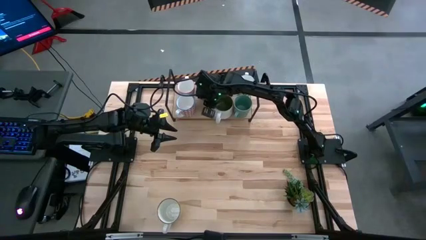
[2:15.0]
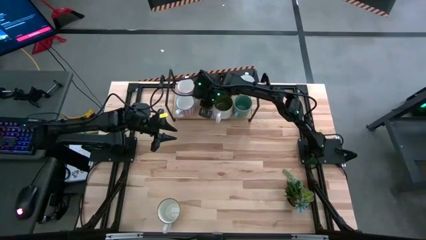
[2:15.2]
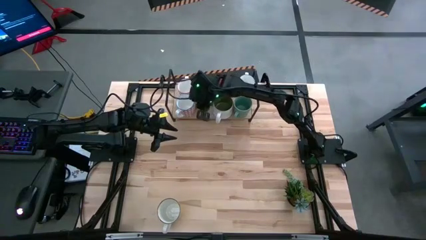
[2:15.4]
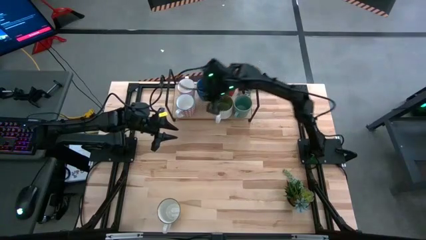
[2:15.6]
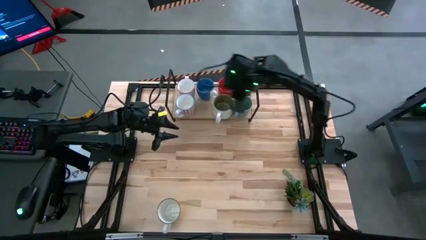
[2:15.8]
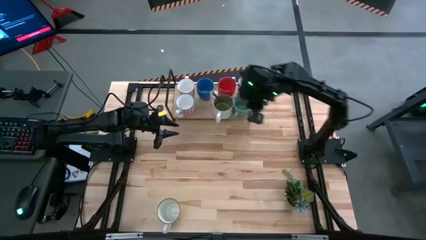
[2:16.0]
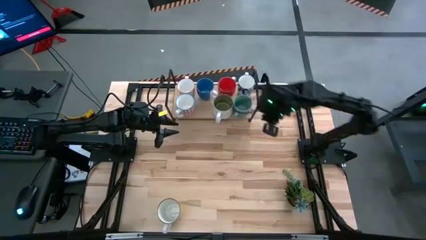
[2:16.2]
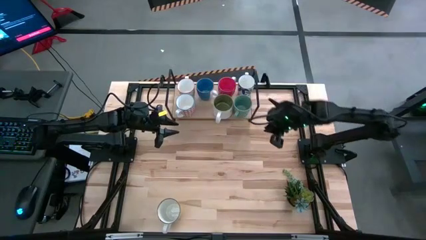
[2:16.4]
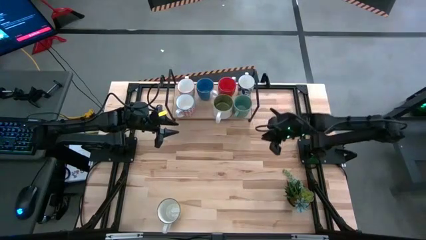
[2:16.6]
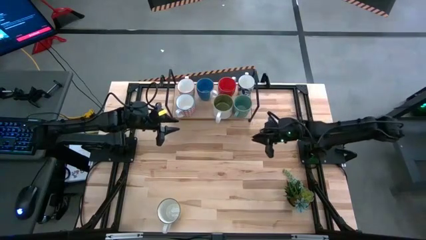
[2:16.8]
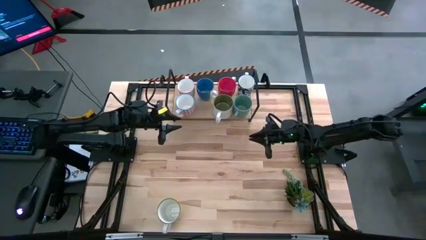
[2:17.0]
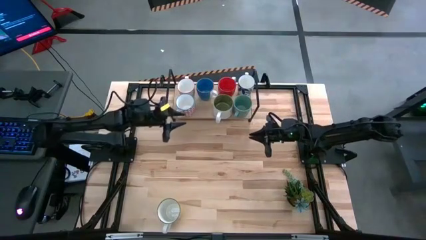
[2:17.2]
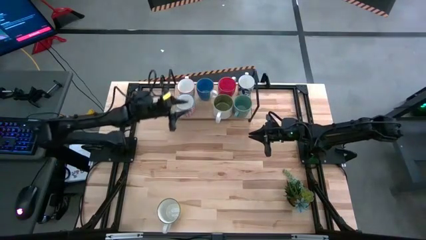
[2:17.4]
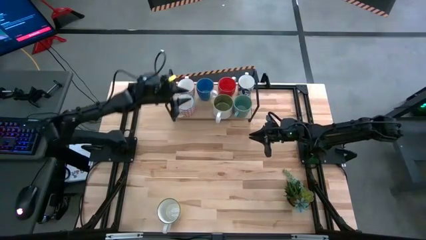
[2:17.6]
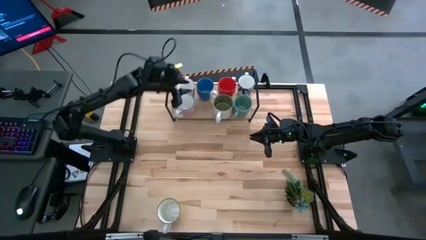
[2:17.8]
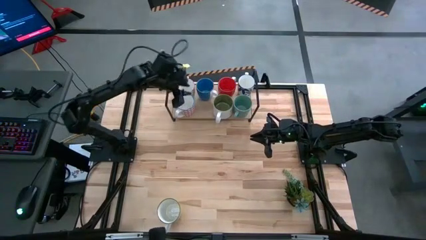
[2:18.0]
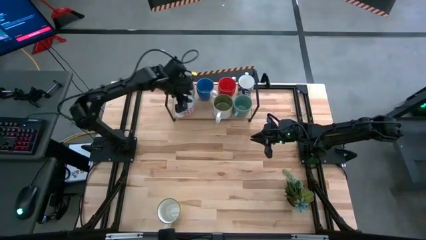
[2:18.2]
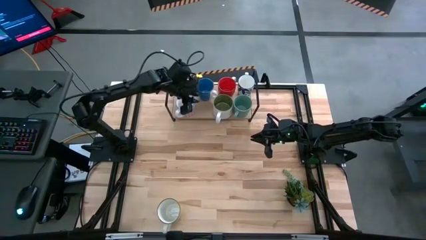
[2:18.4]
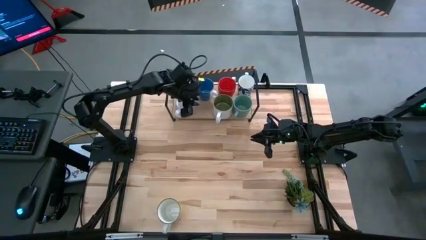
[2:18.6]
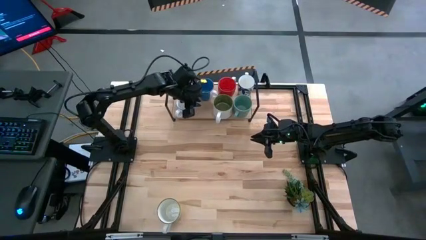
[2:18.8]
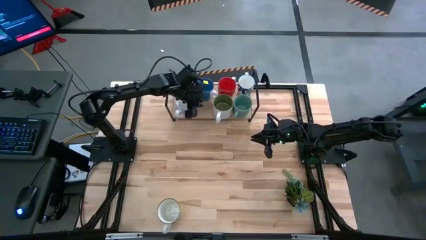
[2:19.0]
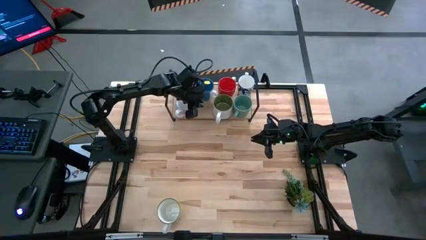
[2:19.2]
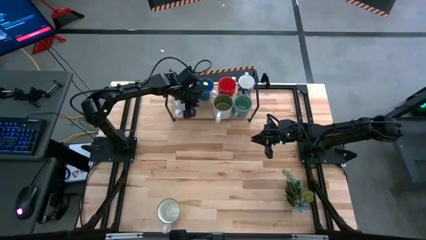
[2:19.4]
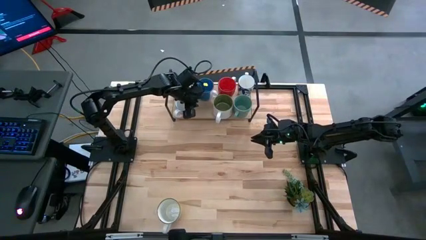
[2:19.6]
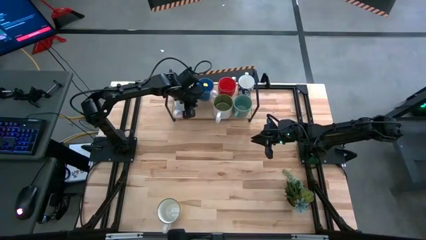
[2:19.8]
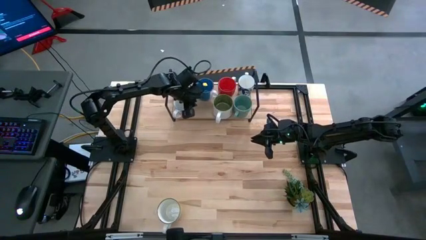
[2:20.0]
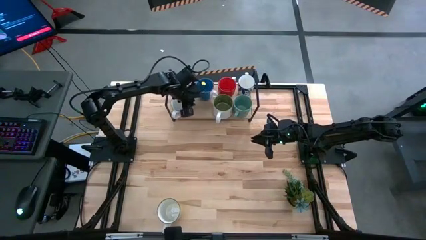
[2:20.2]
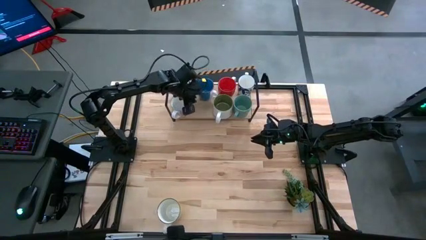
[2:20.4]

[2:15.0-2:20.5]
Task: Place coffee mugs
Adjust the red patterned mug on the shelf

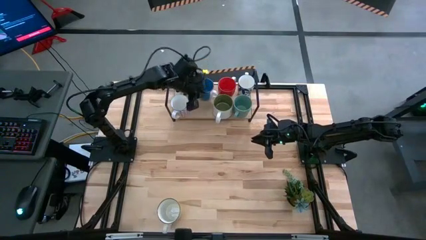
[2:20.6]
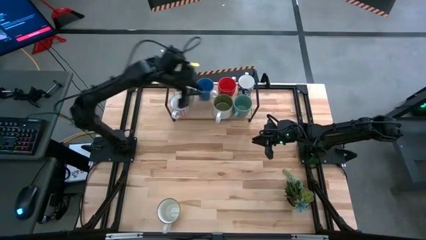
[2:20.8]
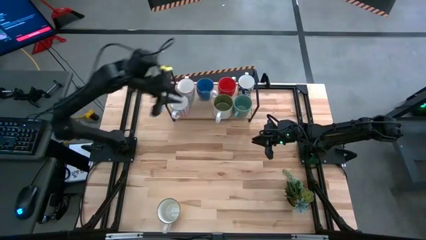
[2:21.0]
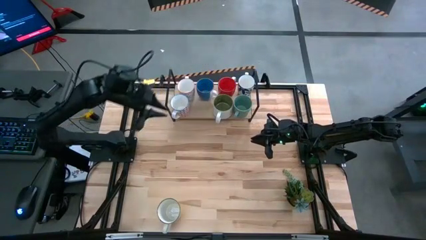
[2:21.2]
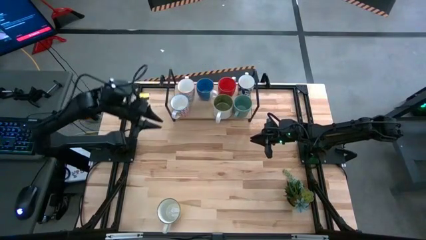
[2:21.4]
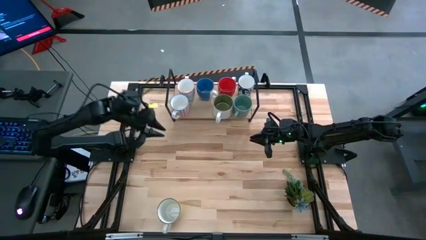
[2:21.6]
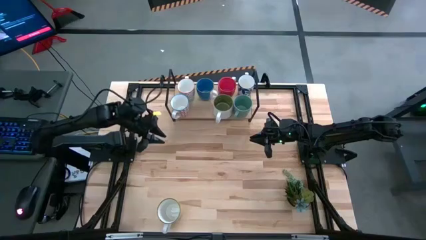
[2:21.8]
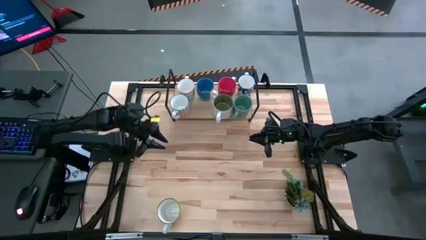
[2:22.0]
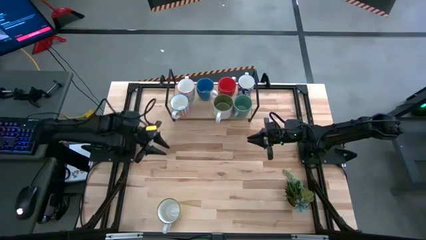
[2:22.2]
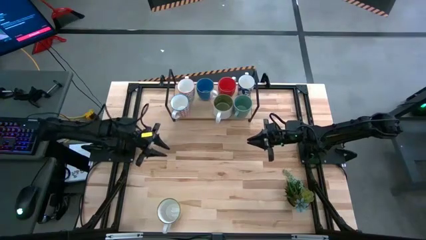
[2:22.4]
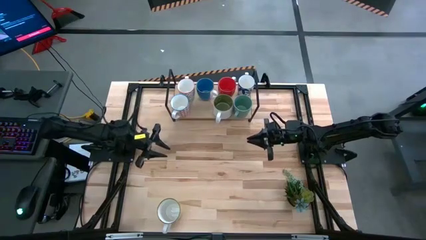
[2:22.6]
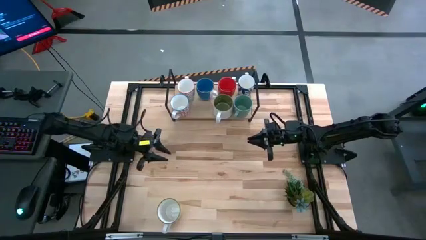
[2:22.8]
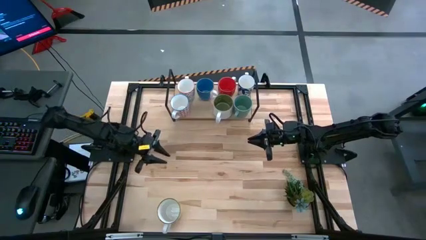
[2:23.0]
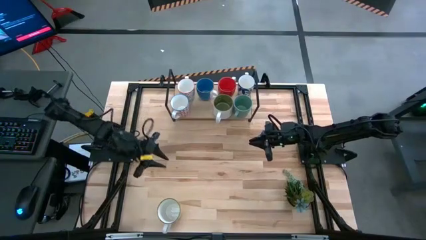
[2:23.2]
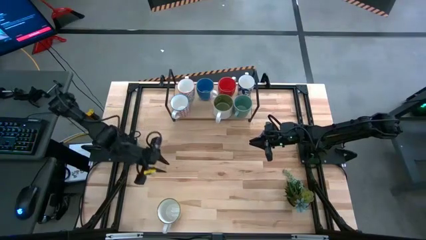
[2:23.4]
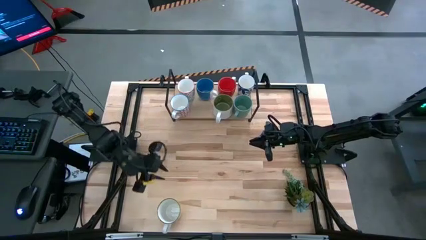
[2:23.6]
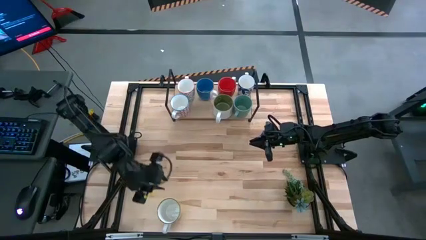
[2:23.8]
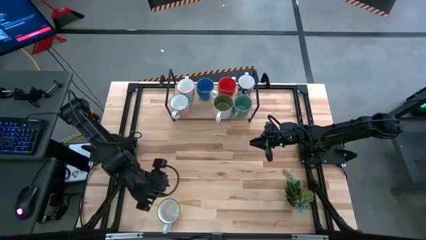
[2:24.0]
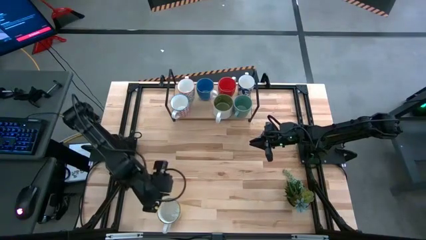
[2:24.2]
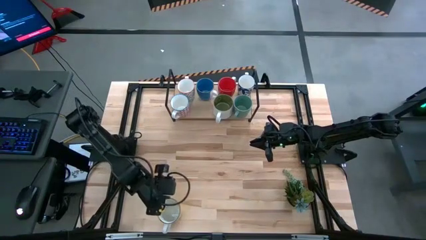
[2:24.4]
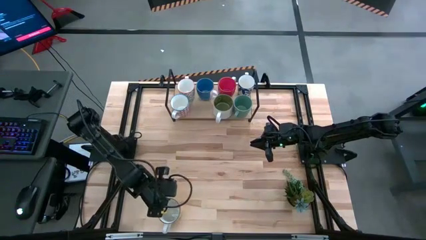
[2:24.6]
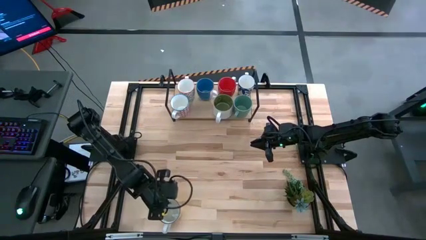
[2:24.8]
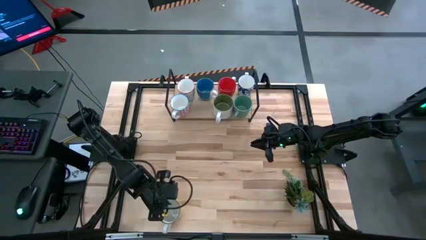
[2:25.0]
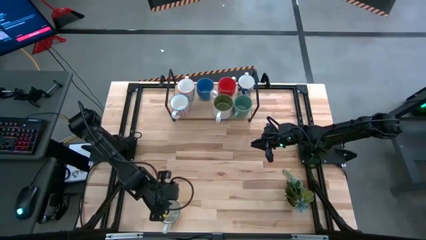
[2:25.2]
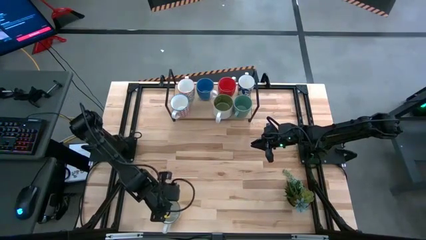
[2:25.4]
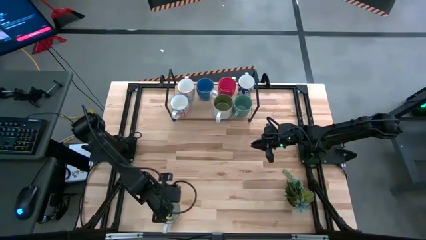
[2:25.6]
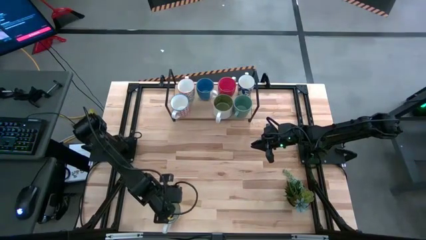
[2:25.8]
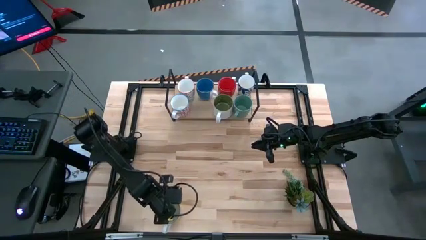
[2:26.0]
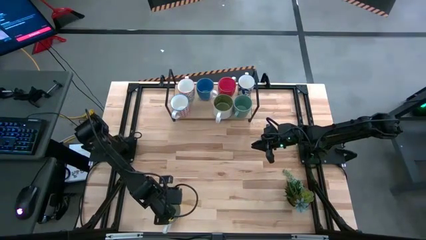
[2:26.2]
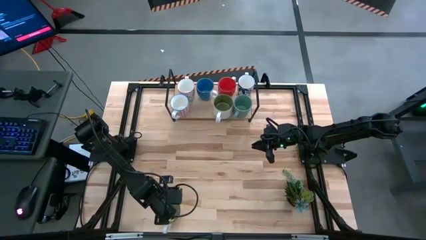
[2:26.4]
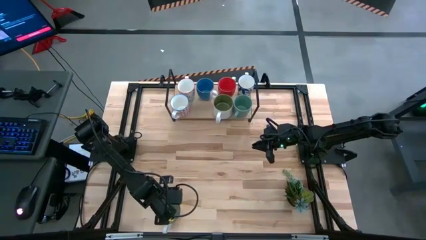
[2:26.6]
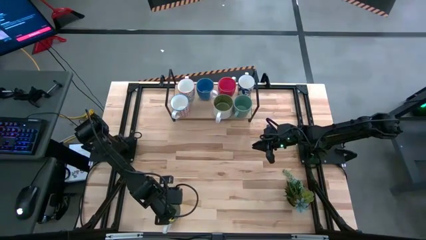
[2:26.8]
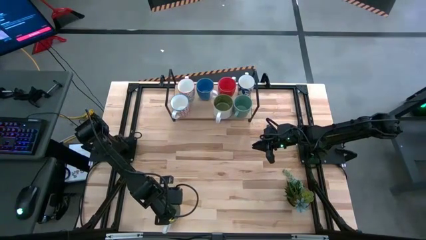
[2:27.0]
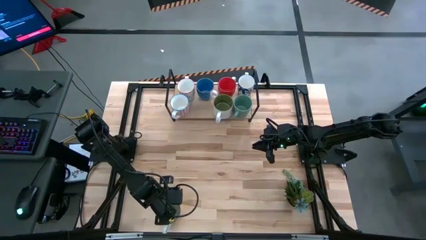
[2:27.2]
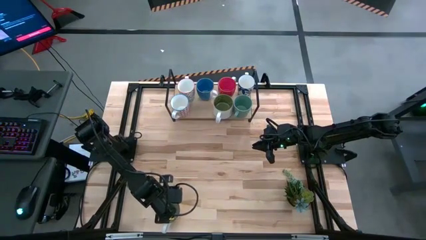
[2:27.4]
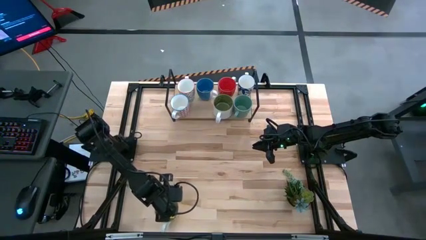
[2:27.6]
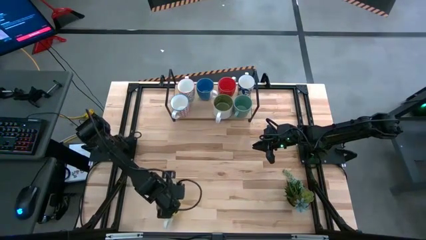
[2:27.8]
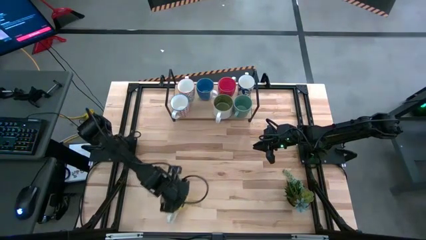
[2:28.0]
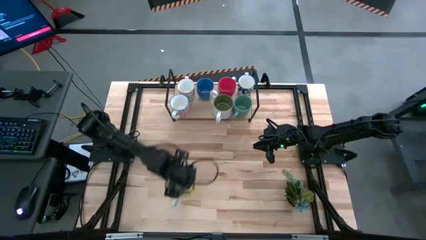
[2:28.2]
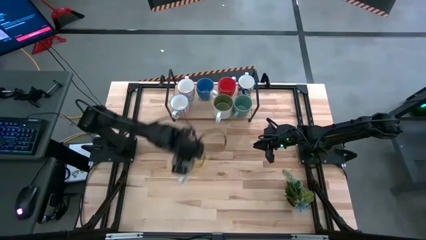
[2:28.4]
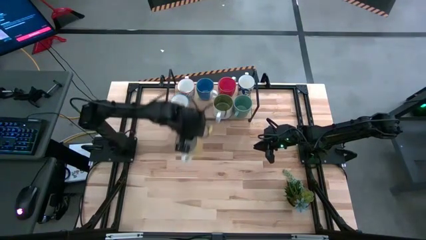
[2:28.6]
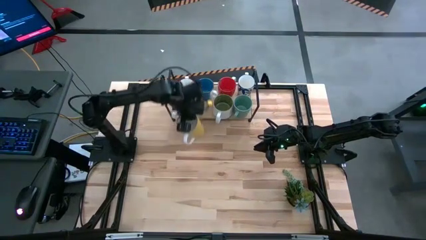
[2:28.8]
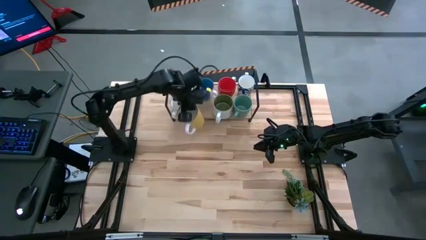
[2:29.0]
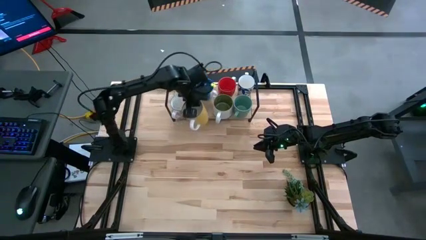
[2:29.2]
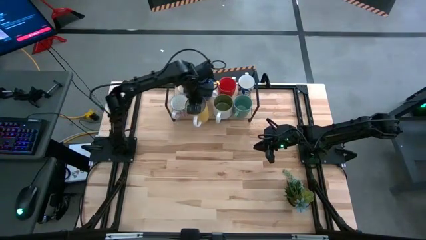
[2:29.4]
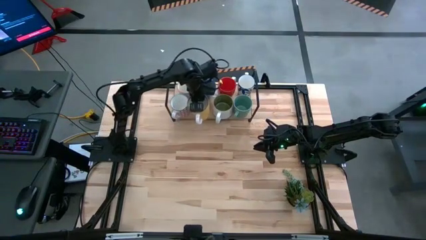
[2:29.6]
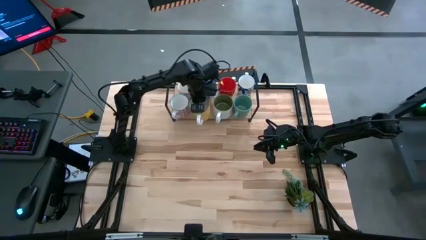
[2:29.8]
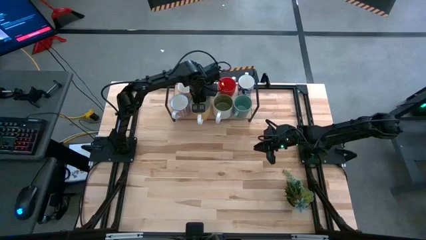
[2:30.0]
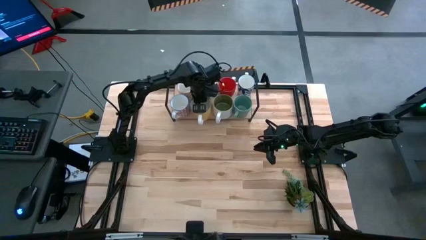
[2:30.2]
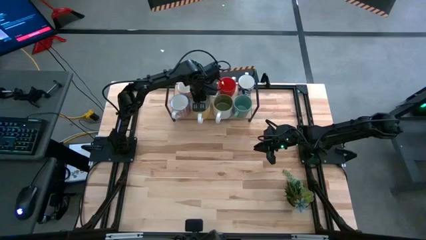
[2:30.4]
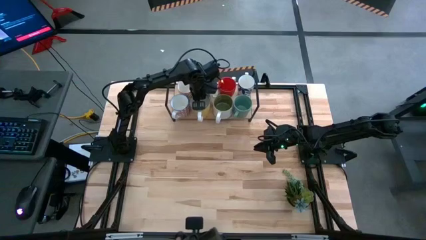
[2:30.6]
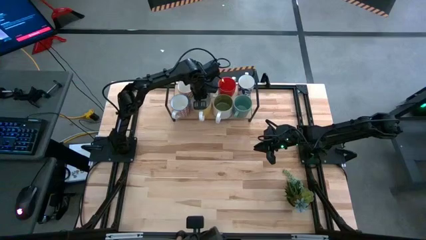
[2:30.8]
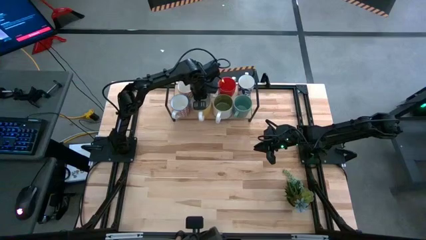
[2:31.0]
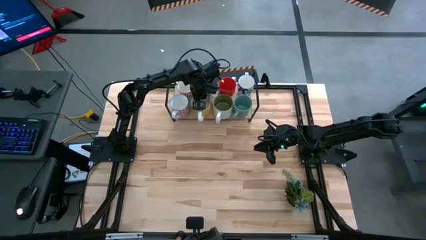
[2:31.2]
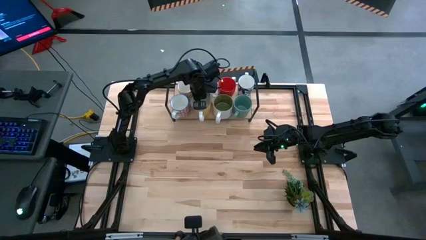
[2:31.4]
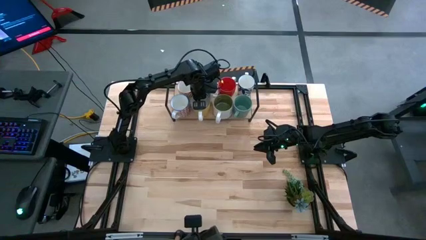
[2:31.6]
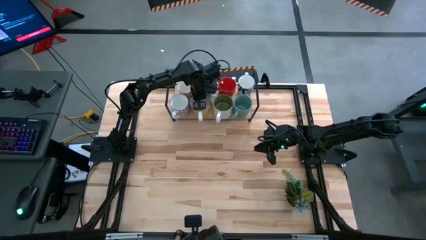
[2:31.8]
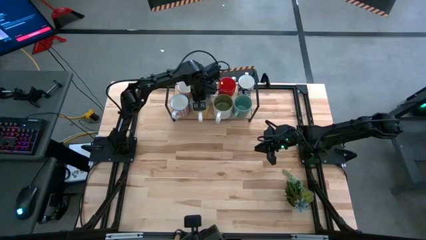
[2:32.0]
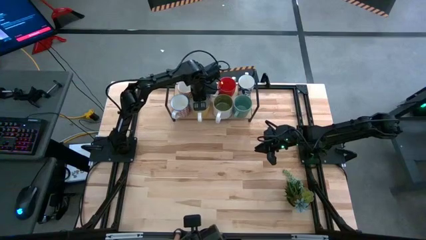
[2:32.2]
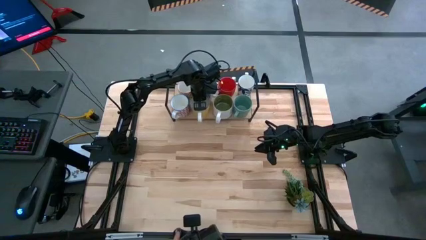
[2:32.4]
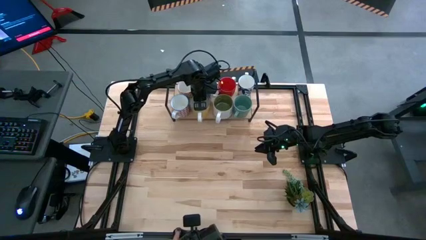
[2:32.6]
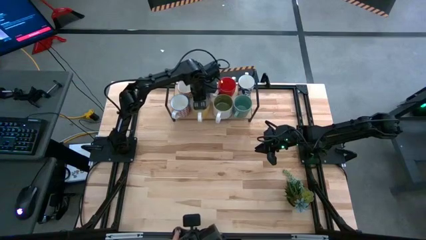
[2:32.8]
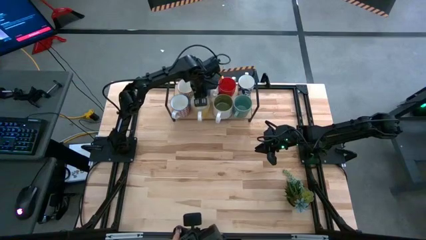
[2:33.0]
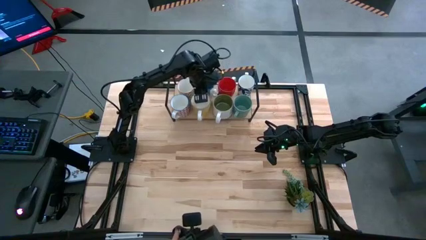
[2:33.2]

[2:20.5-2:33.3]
Put the yellow mug on the shelf
